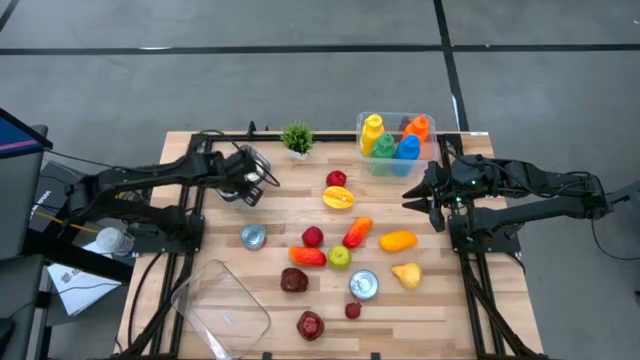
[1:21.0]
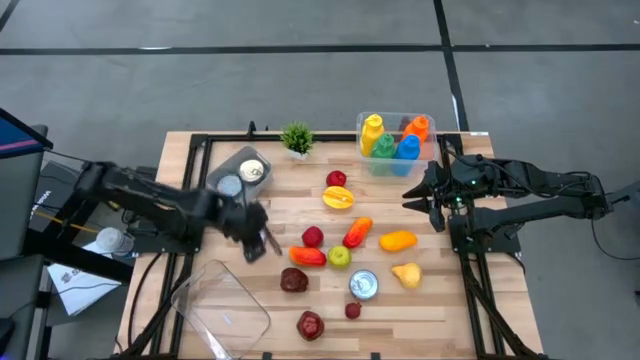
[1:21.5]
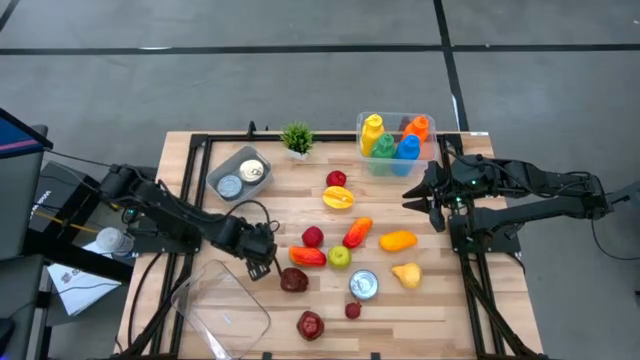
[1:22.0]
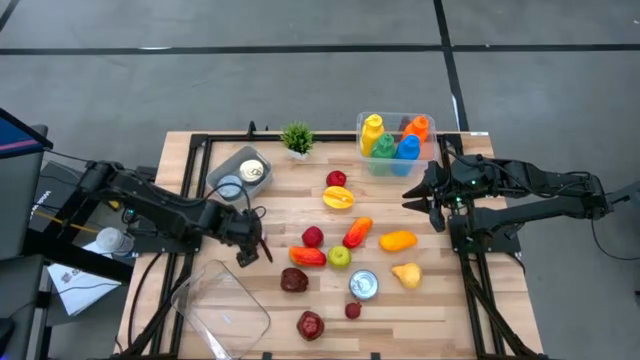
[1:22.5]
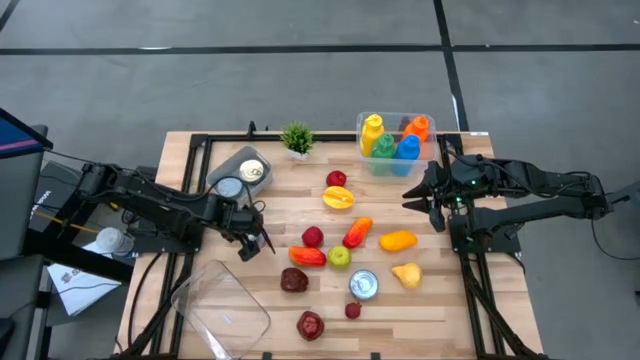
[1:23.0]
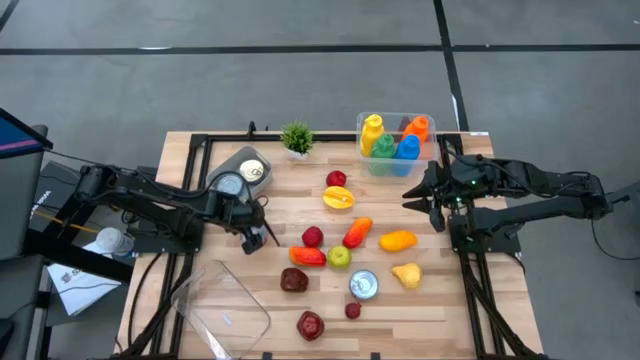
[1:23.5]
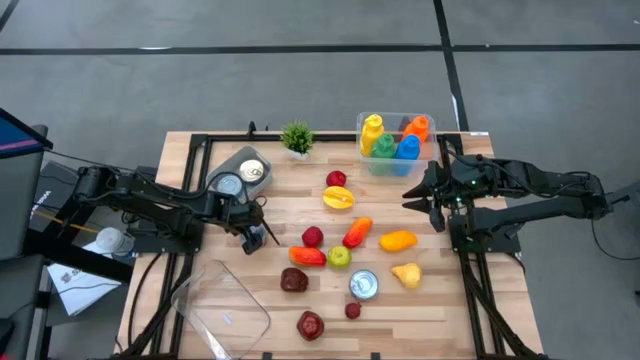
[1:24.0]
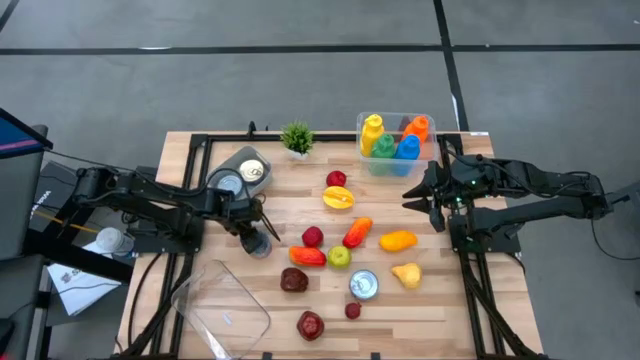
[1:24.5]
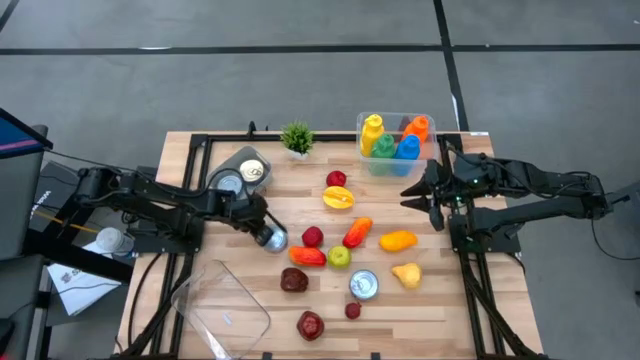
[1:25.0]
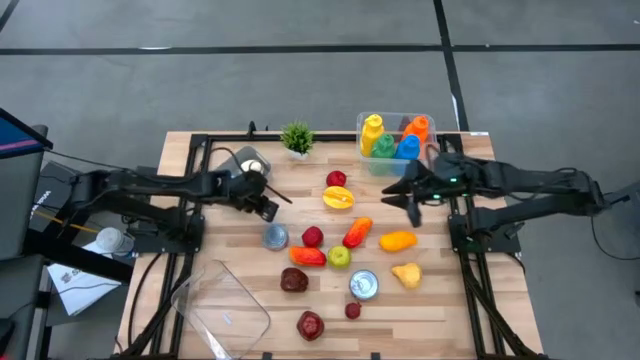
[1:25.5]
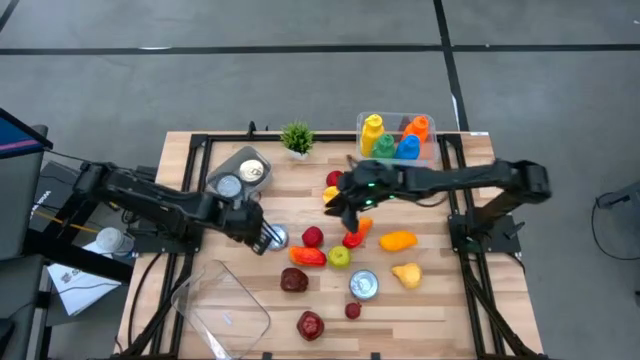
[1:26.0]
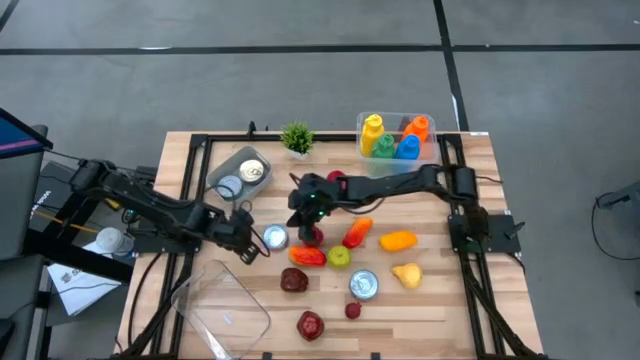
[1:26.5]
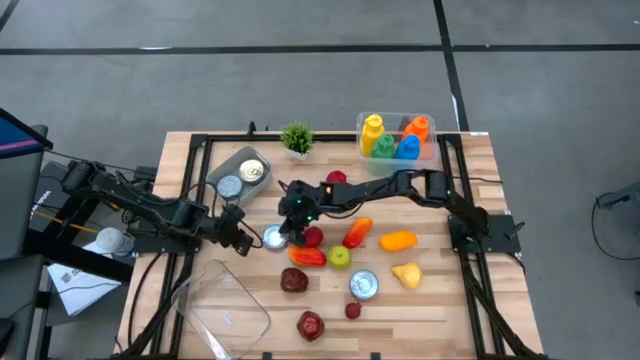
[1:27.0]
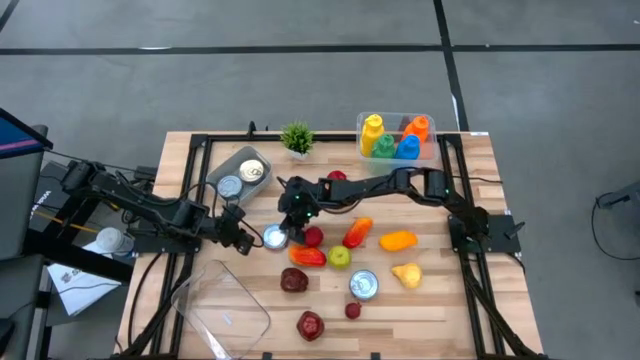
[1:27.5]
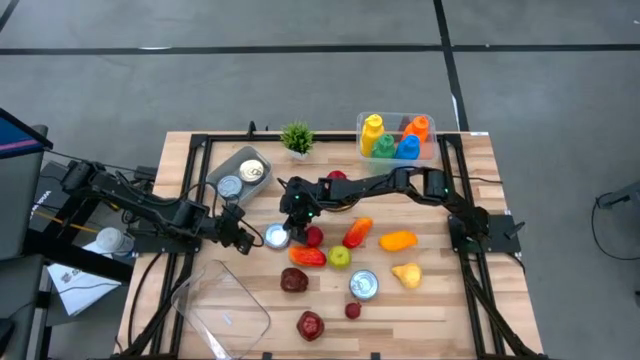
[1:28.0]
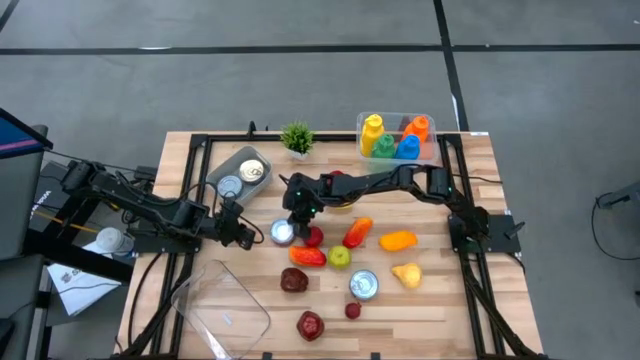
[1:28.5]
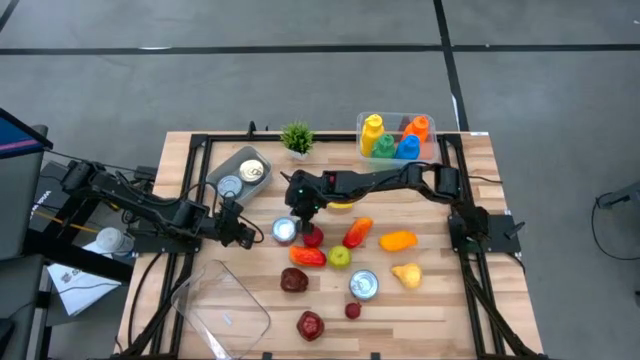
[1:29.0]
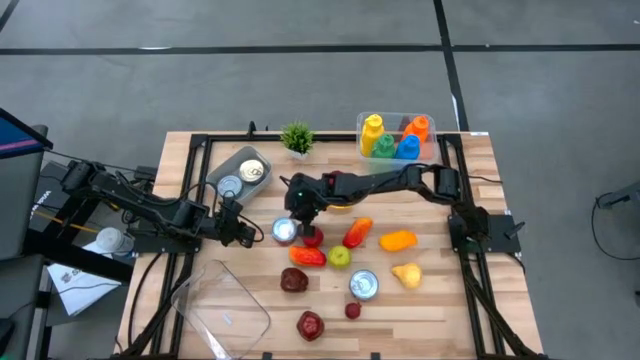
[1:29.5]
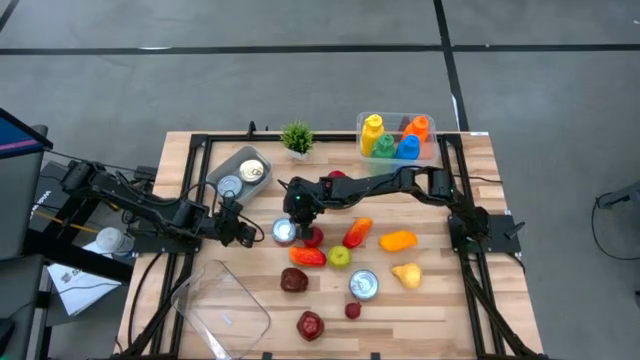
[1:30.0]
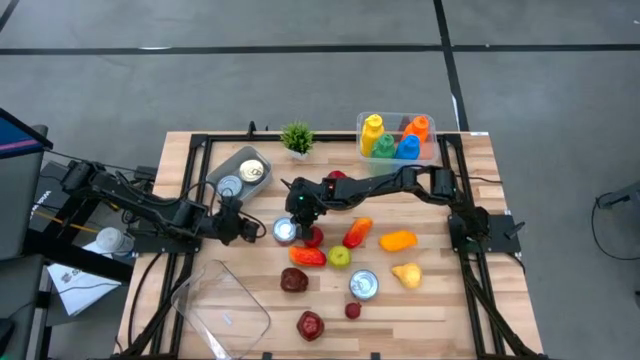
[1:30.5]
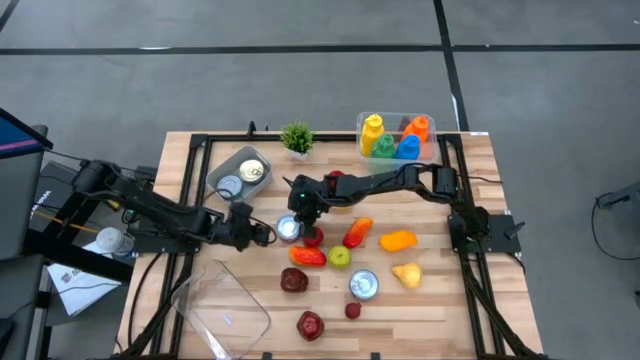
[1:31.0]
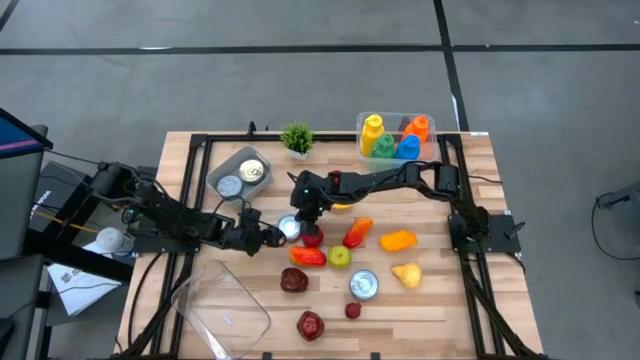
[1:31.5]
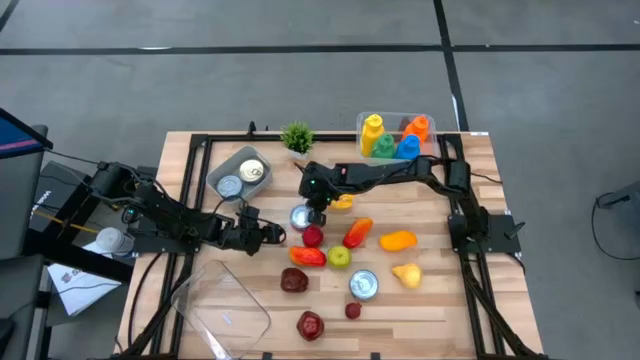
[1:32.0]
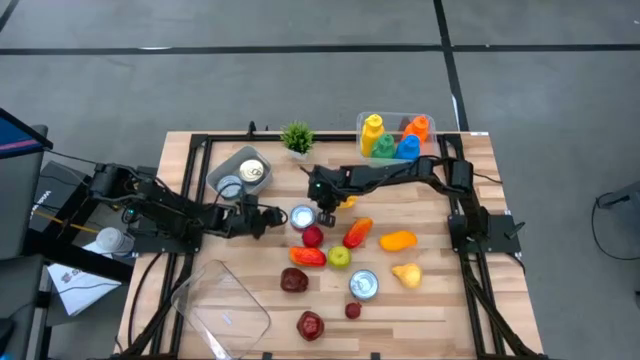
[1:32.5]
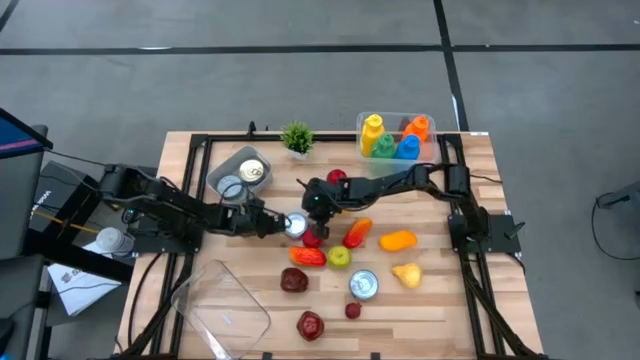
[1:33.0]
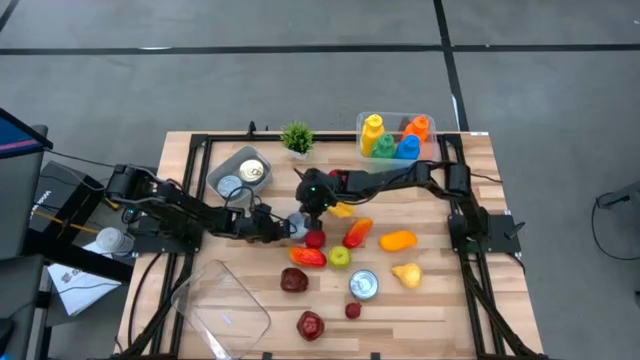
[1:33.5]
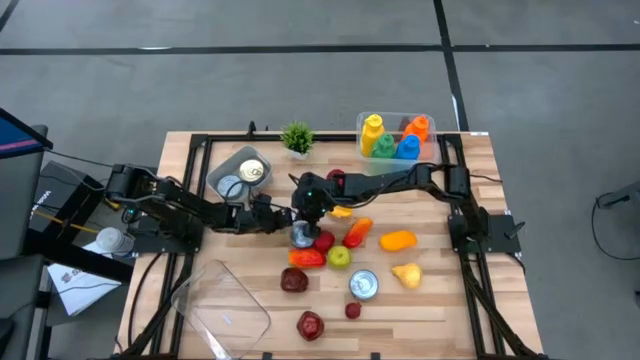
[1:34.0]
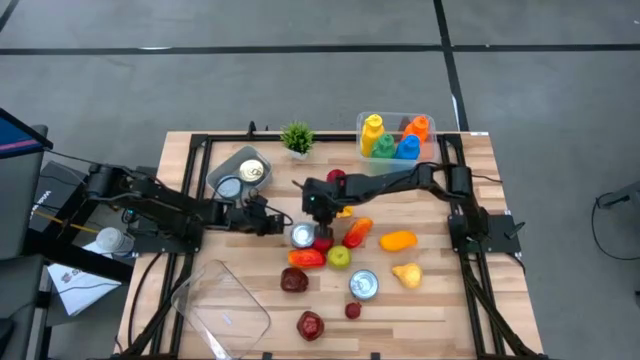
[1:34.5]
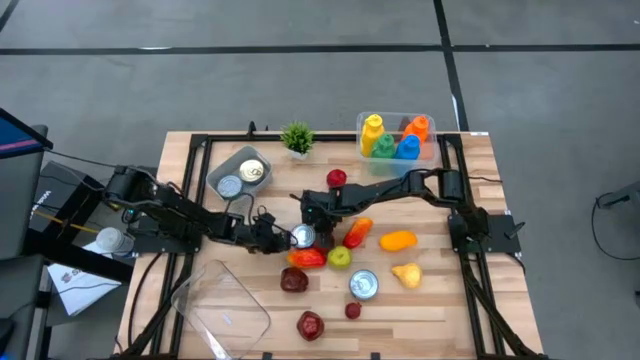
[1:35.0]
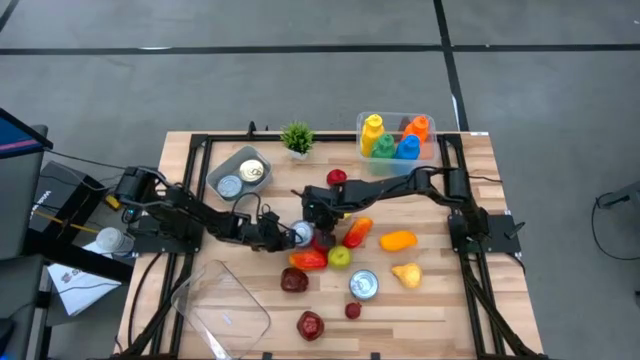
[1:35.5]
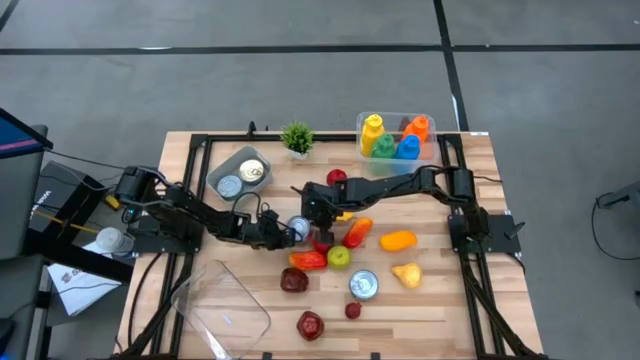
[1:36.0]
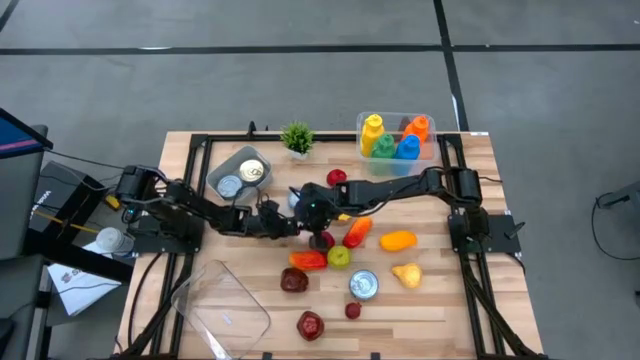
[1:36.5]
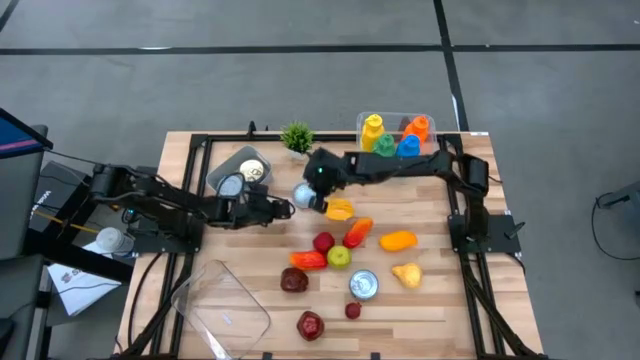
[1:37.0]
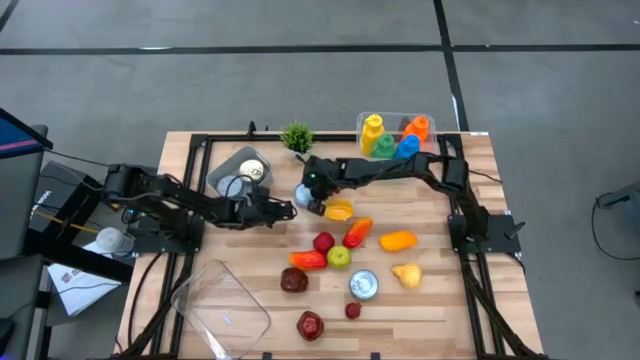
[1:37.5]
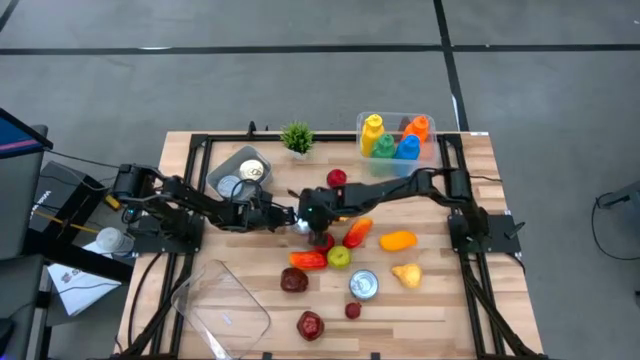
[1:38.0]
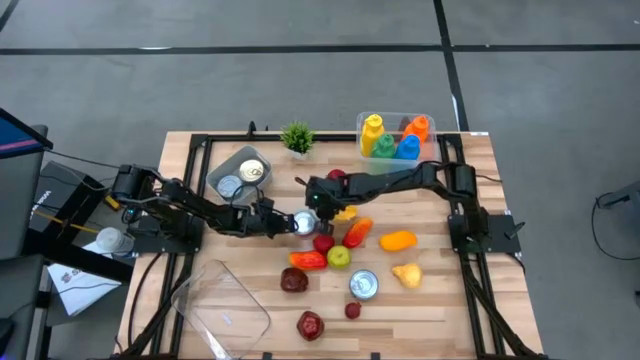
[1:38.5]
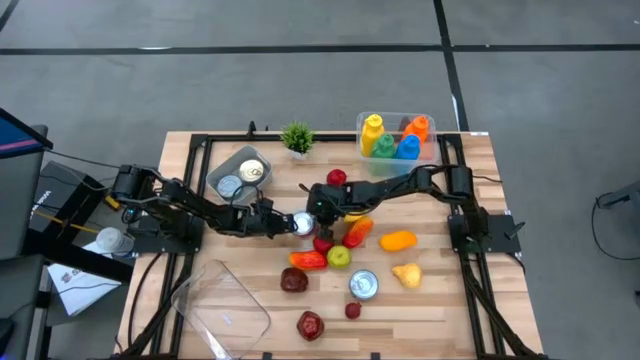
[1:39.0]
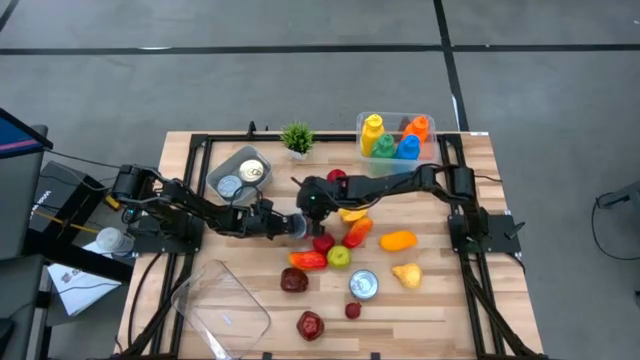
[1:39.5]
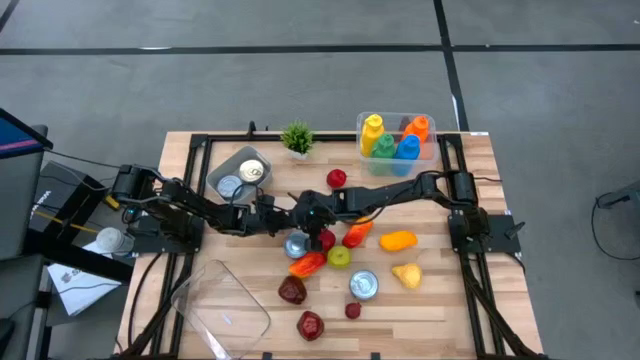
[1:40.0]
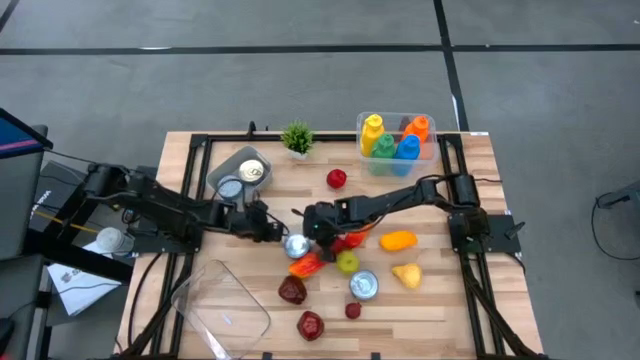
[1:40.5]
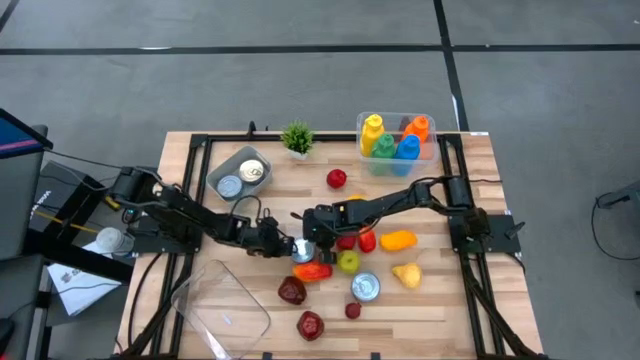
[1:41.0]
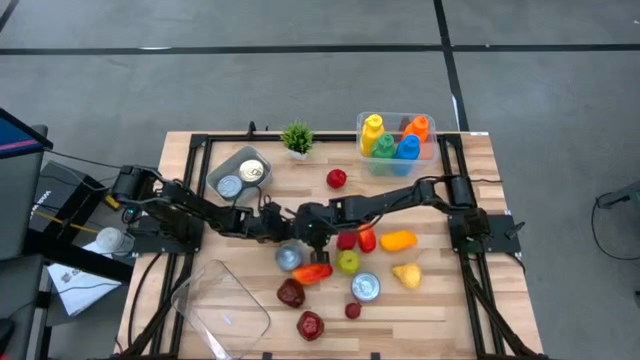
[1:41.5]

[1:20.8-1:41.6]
Task: Pick & Place Food Item
Put the red tuna can into the gray bin

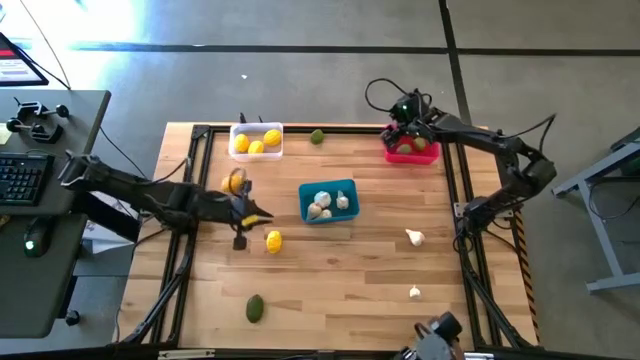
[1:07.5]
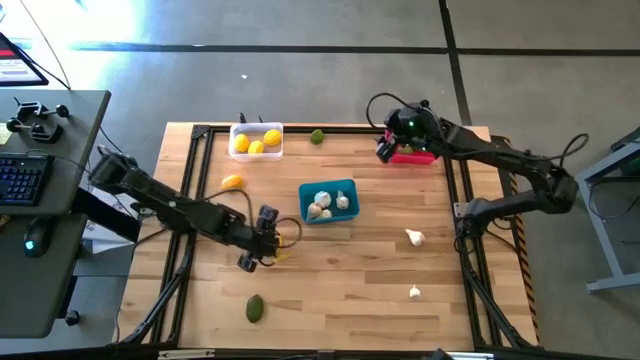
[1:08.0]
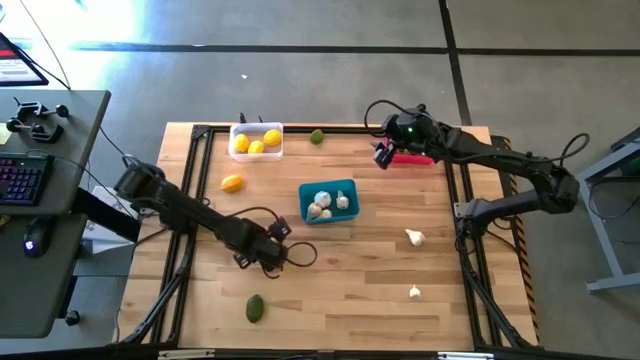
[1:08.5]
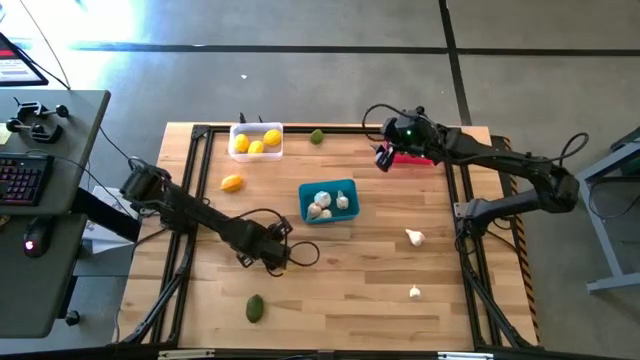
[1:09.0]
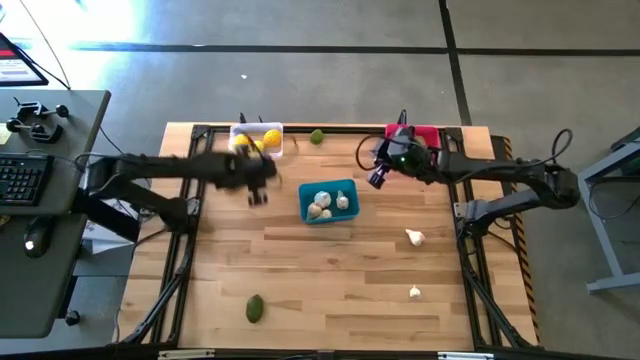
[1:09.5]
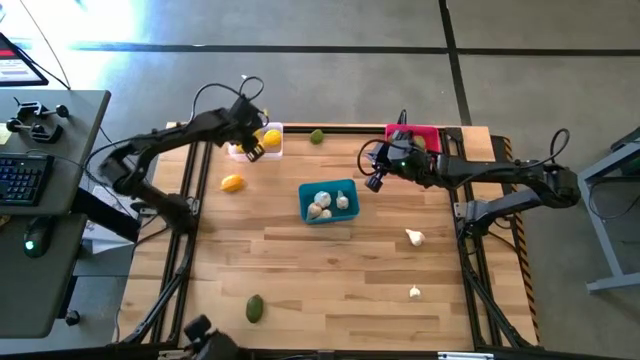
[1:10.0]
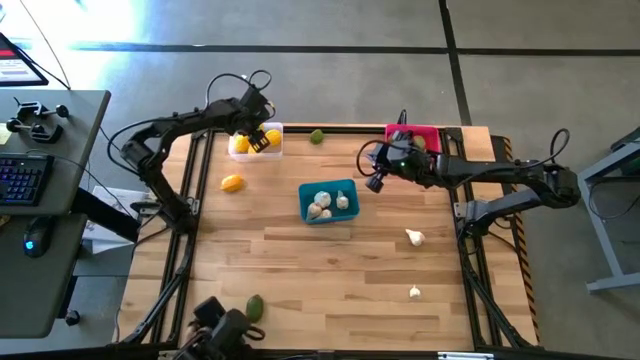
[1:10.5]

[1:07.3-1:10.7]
Task: Sort produce into baskets
Put the lemon into the transparent bin
